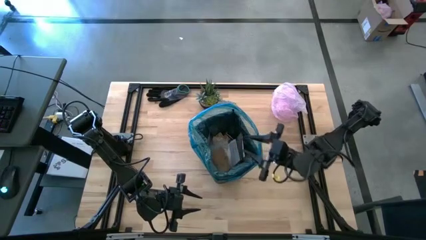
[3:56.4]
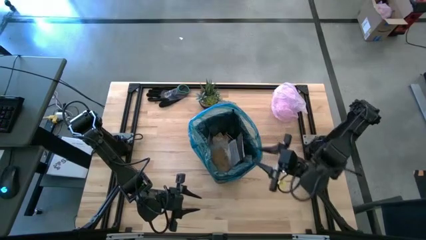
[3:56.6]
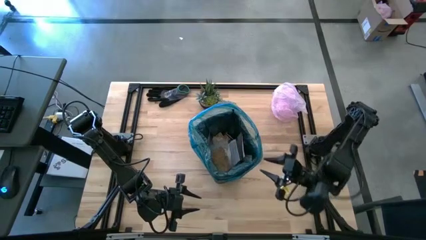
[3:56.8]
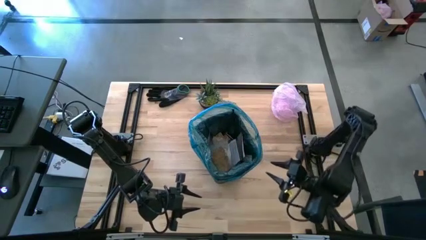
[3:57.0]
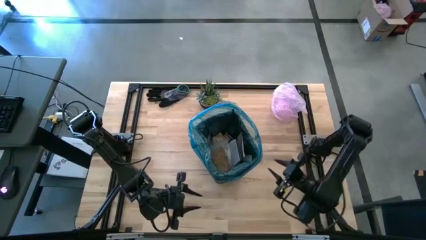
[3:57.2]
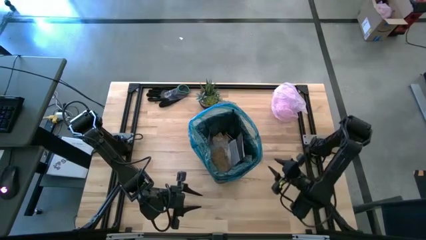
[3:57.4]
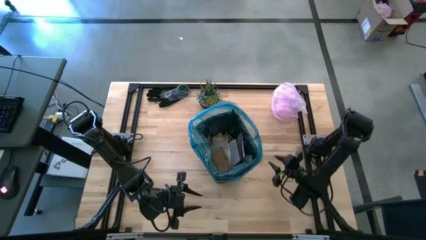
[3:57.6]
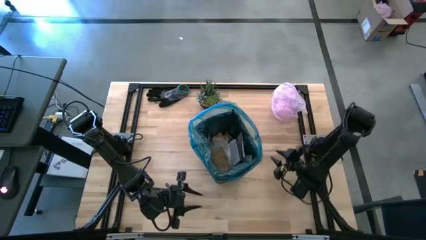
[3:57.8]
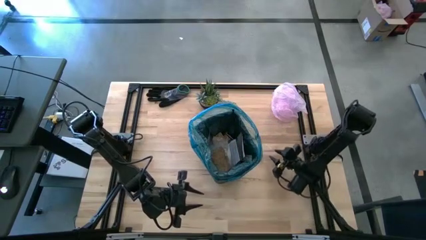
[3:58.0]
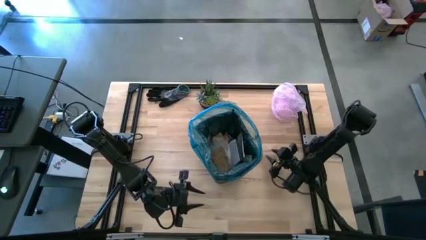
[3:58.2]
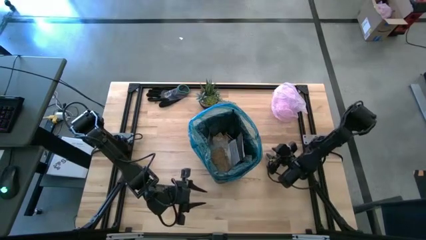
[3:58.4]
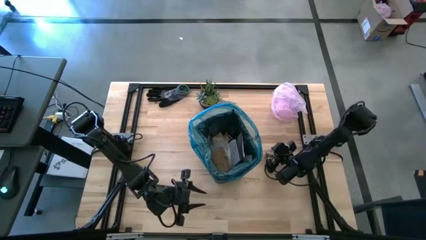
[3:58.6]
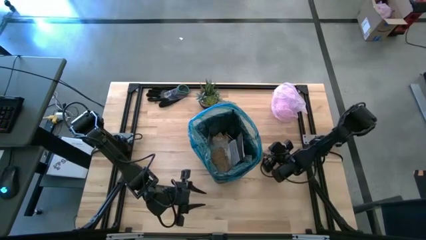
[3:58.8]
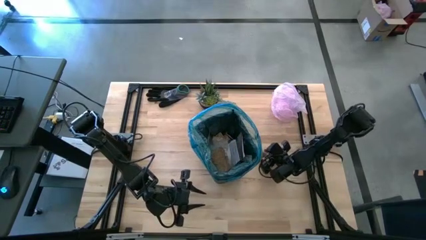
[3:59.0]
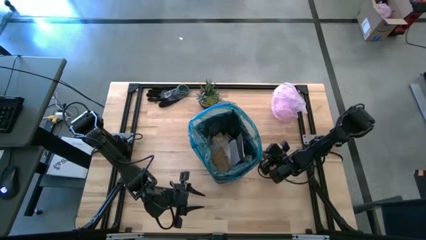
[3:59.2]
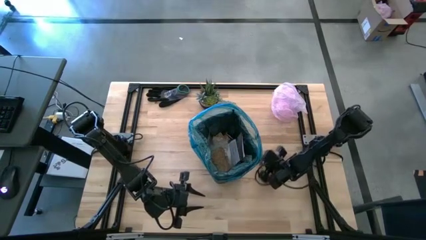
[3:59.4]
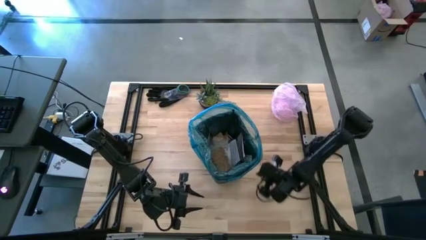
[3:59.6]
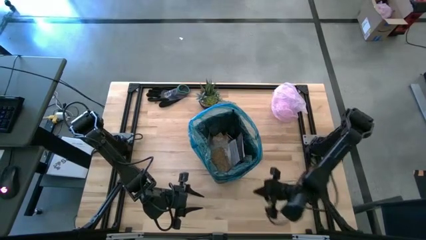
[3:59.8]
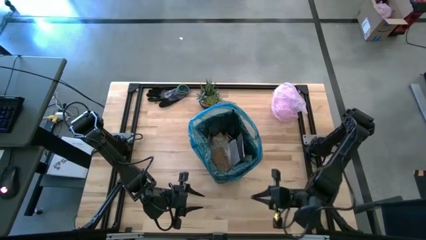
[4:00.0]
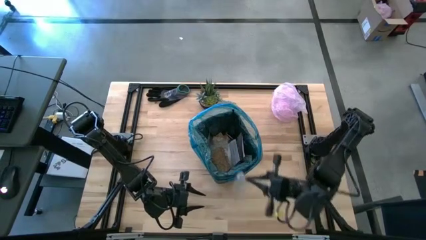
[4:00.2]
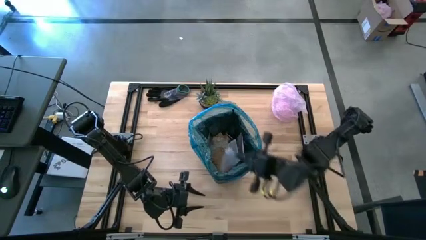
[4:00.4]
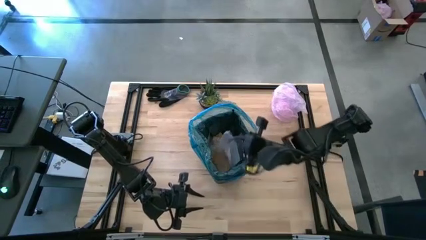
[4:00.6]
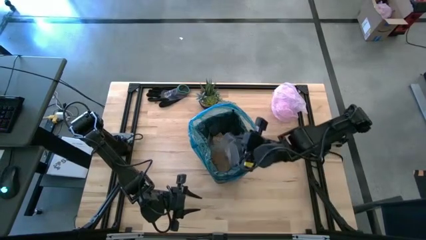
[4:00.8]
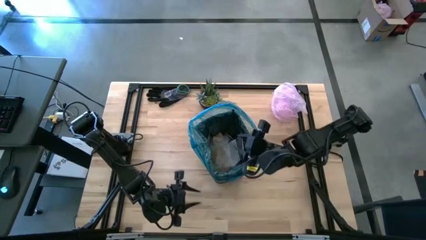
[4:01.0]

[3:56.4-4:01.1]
Task: place trash/remove bag and relplace
Put the transparent plastic into the trash bin

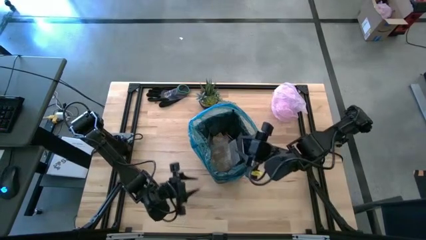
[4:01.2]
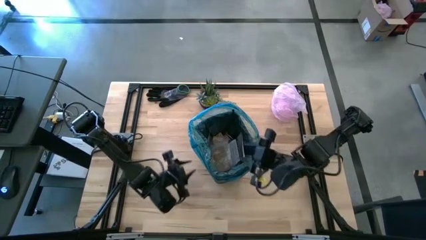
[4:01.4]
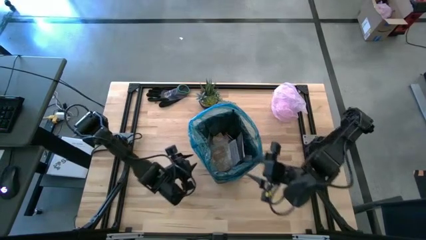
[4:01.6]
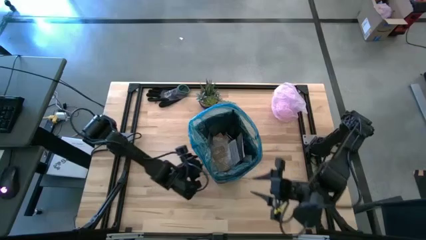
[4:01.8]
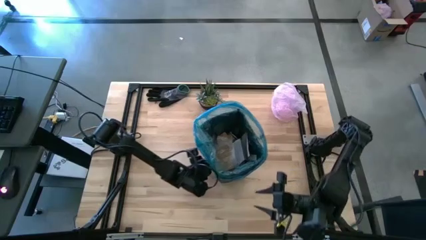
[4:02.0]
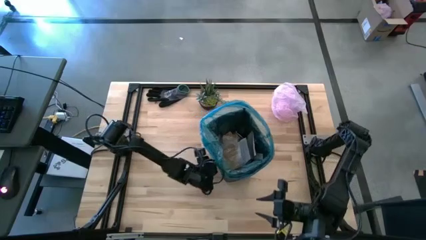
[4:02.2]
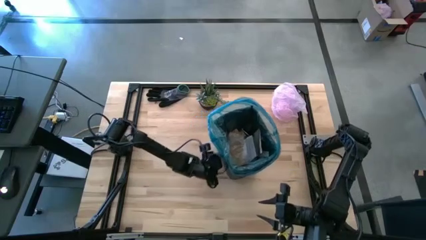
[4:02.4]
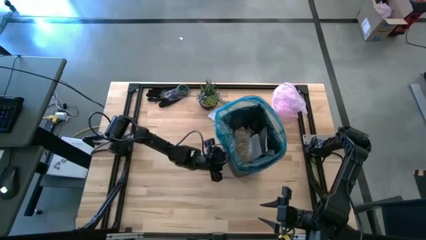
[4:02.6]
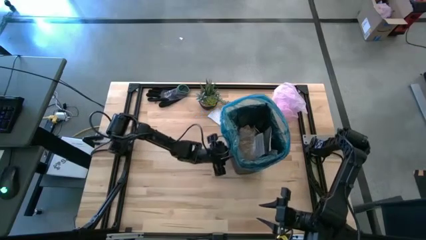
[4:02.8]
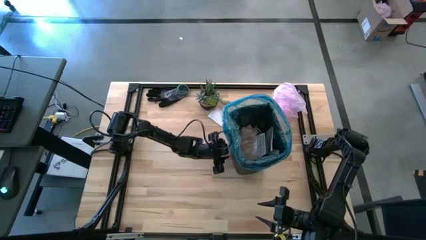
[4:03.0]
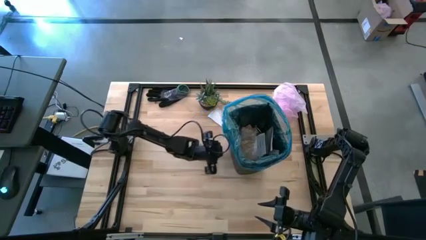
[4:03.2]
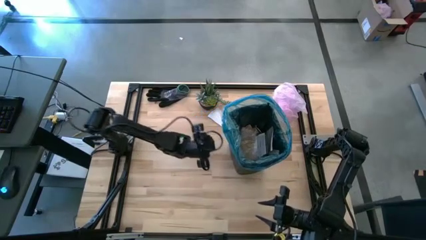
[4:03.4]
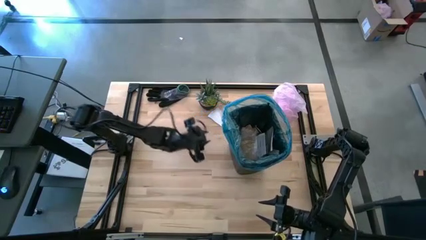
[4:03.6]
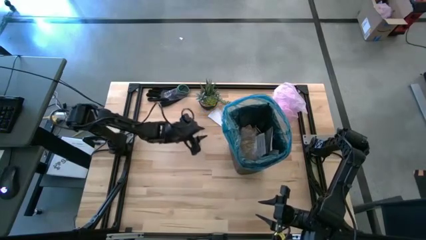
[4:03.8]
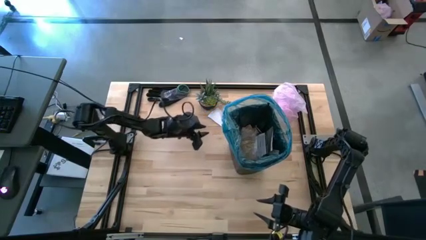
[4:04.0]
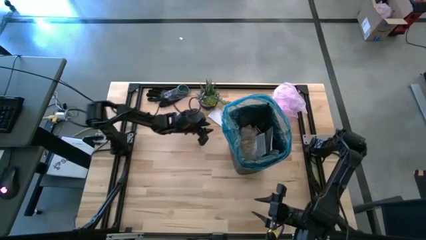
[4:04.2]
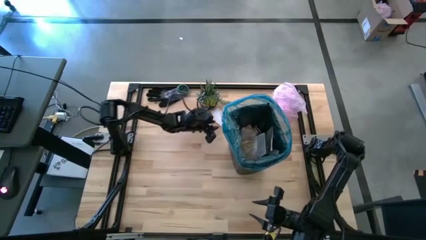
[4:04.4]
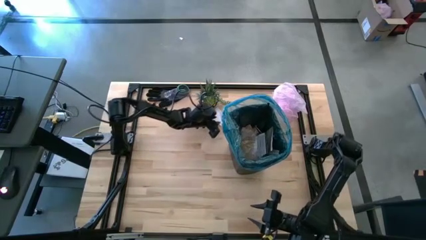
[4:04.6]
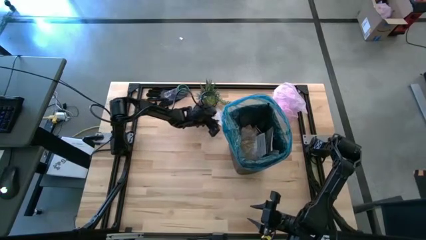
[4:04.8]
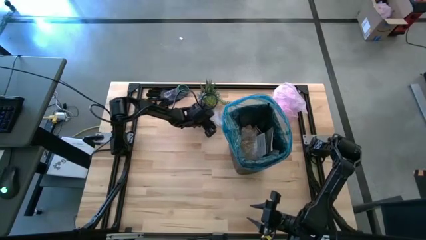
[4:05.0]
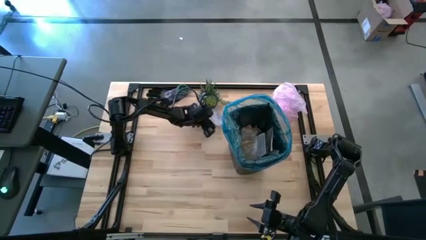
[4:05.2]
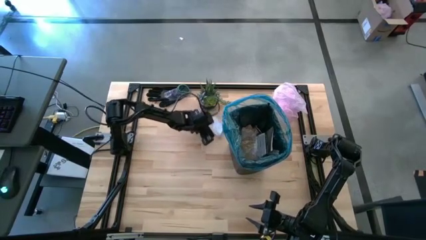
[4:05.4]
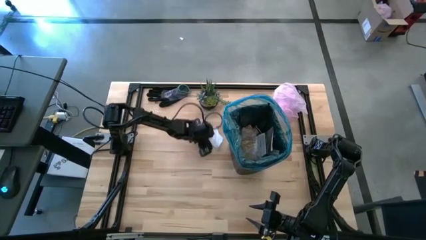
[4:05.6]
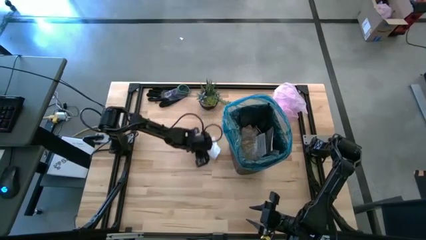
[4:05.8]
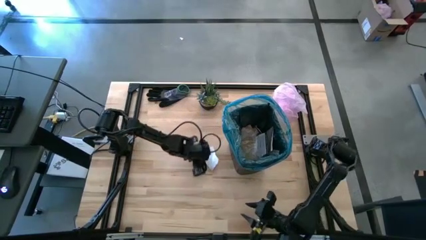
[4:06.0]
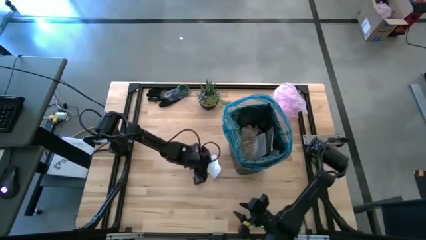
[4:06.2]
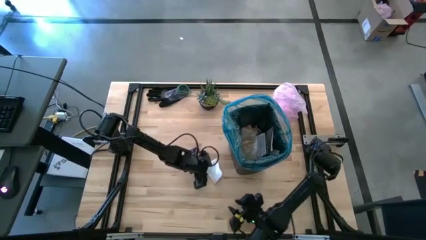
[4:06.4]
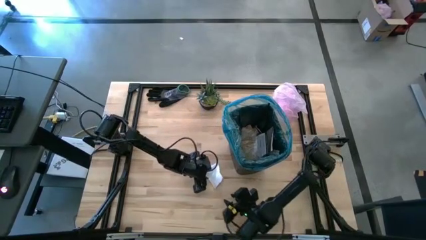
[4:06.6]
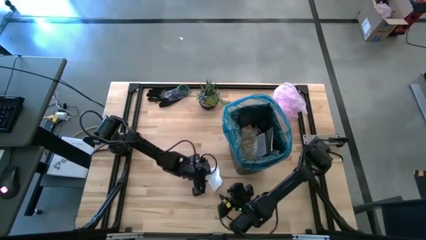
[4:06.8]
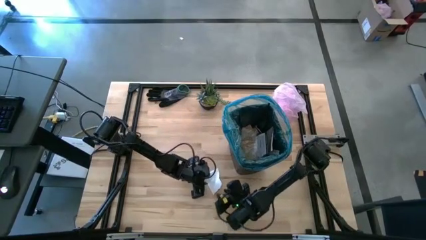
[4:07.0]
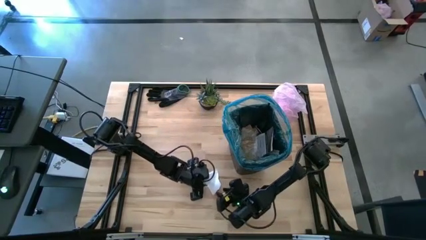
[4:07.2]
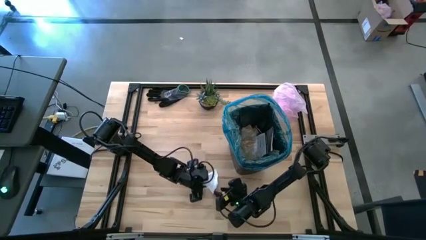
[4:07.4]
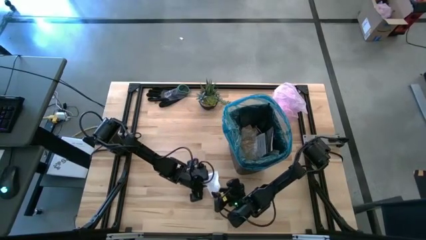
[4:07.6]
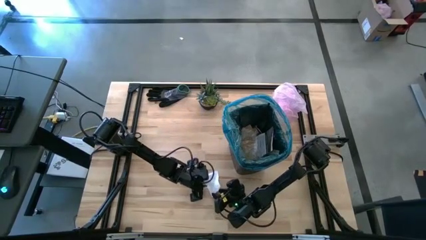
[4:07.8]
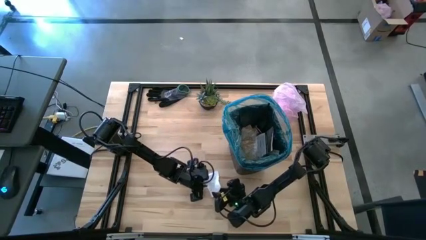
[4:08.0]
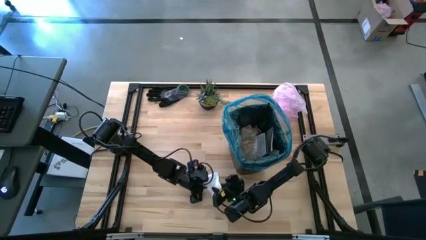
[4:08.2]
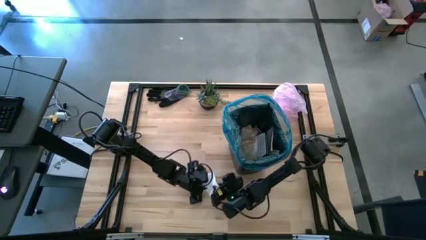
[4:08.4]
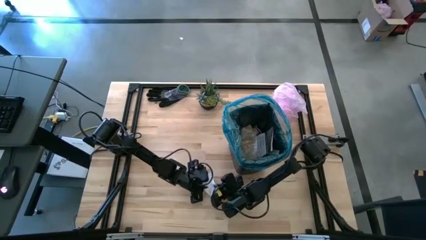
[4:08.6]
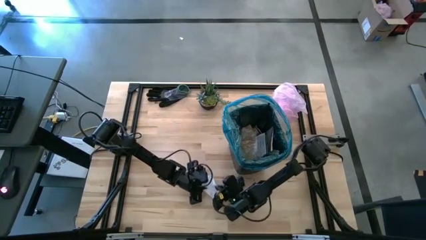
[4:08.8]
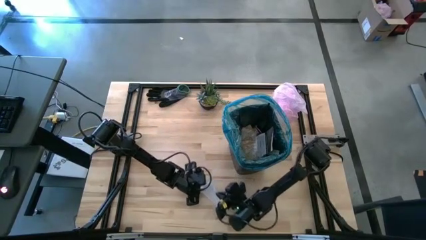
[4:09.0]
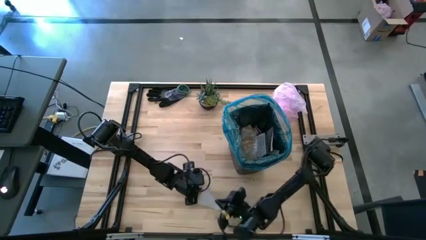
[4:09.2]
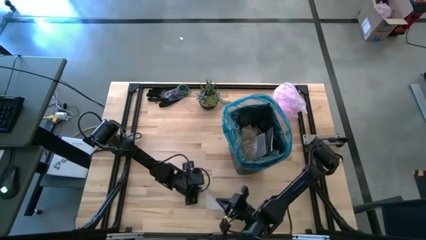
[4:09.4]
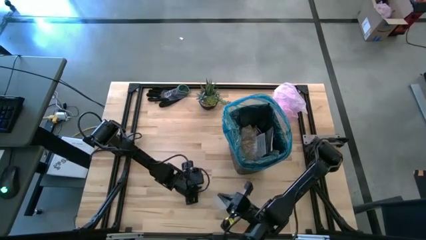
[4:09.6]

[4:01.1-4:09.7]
Put the white paper into the trash bin

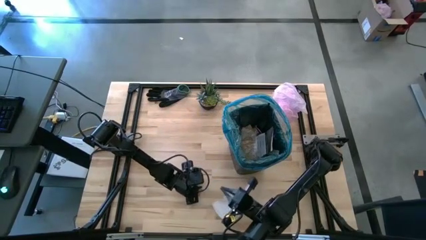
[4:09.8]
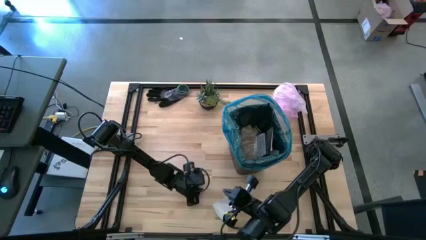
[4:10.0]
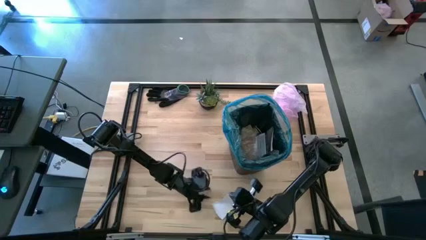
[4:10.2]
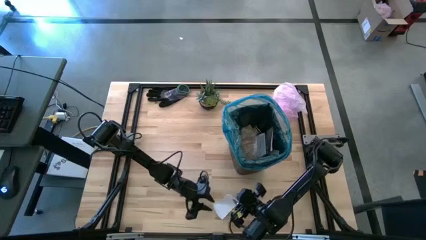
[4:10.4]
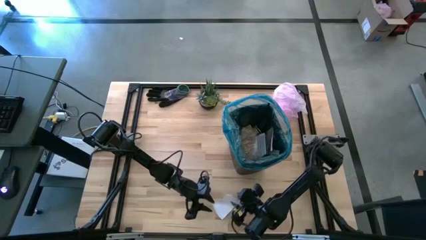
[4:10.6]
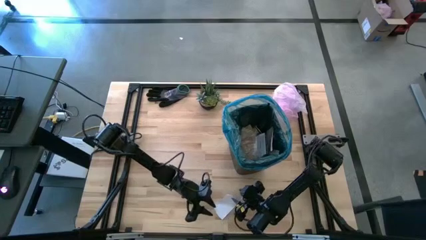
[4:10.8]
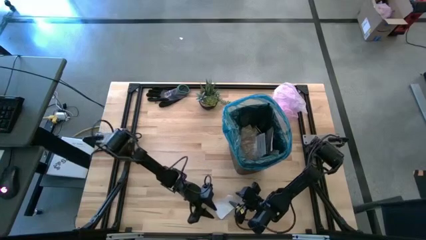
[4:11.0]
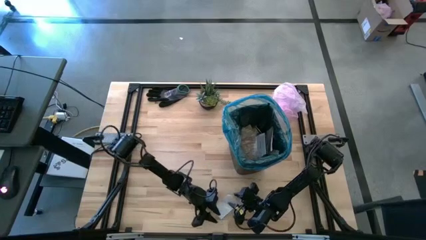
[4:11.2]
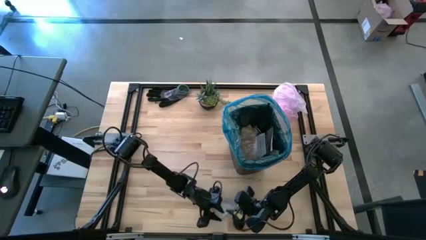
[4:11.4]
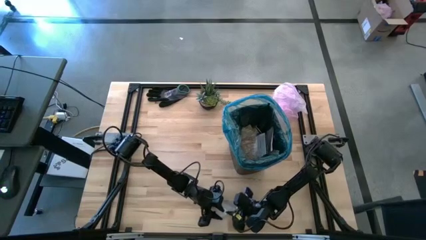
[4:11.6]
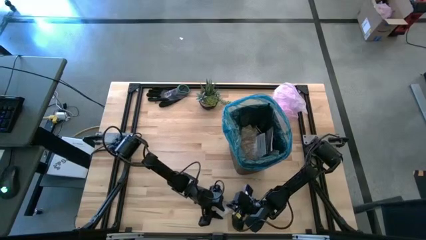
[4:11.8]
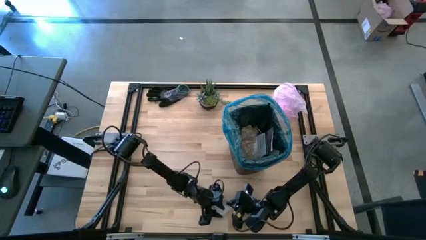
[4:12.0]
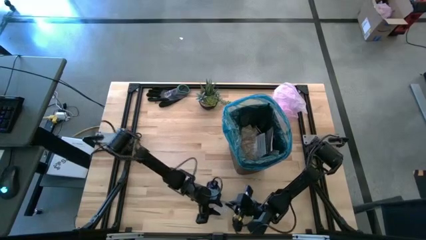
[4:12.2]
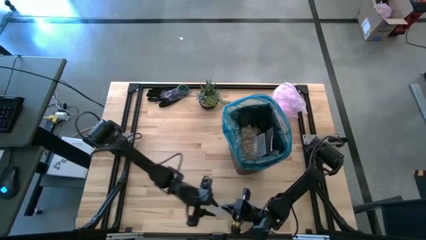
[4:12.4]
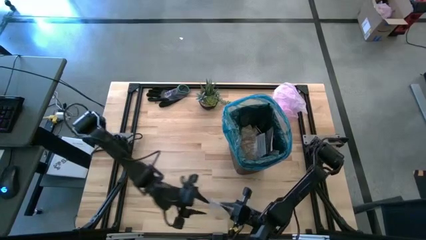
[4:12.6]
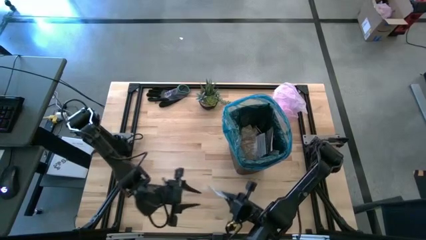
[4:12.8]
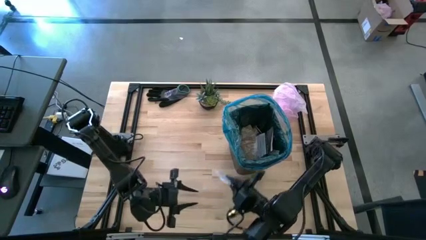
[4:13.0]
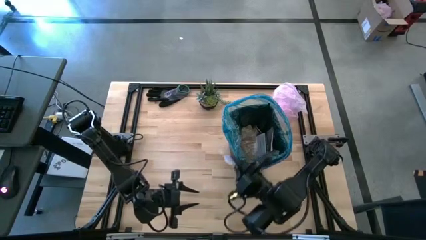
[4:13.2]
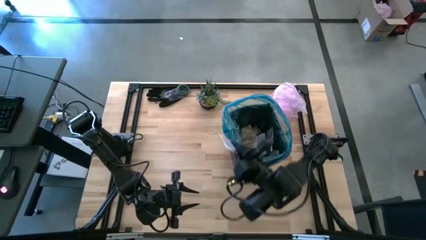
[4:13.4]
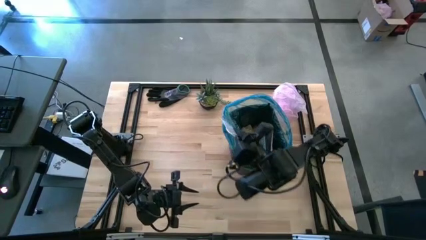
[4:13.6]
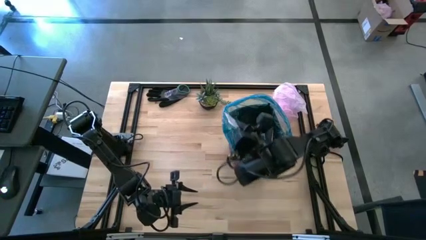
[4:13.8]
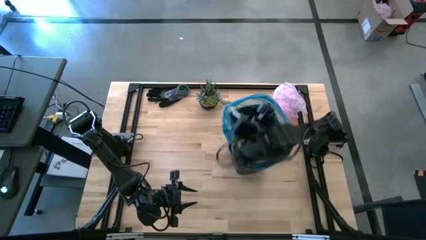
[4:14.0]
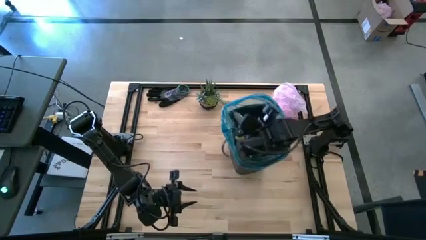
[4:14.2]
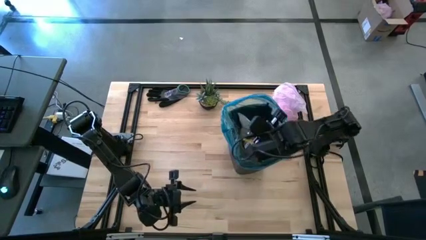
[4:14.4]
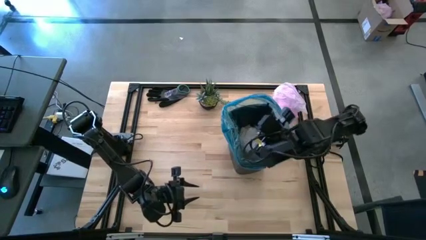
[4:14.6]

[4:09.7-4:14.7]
Put the white paper into the trash bin
